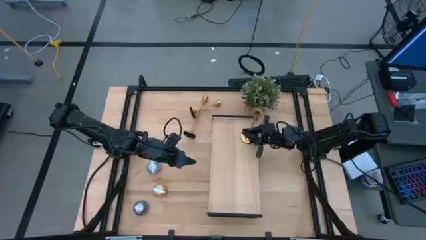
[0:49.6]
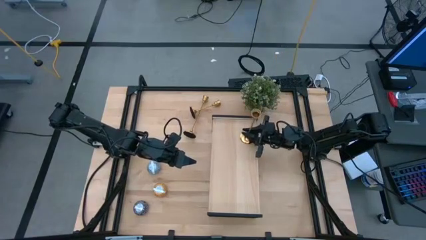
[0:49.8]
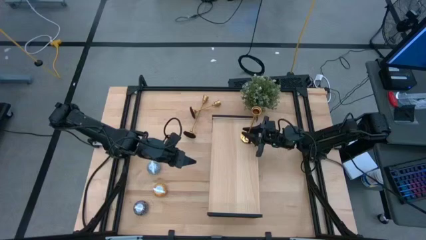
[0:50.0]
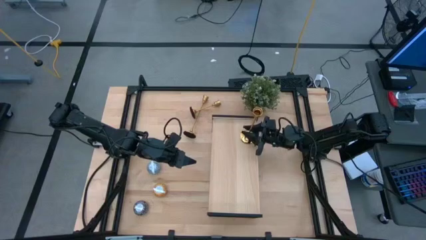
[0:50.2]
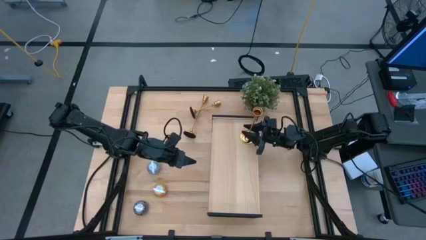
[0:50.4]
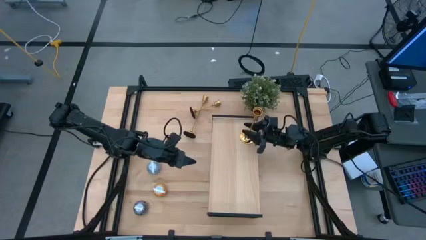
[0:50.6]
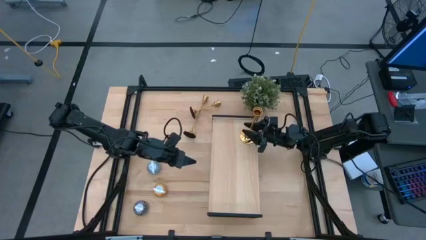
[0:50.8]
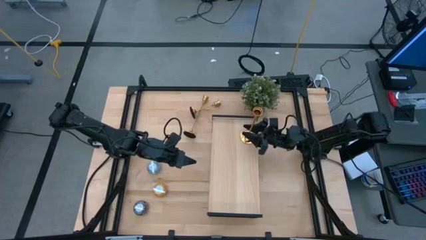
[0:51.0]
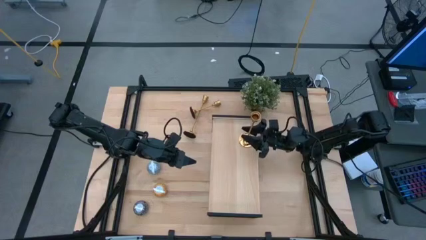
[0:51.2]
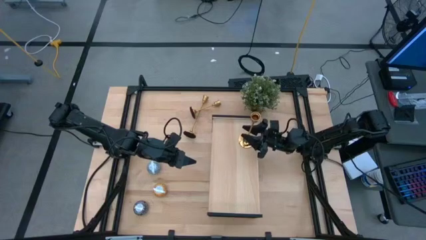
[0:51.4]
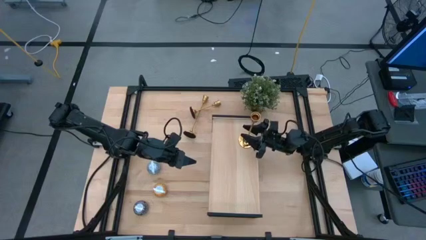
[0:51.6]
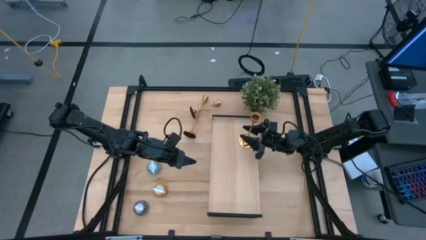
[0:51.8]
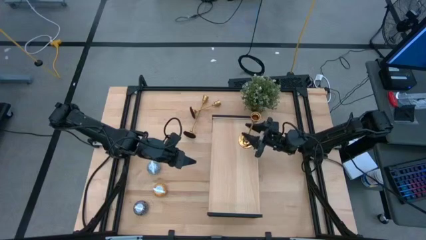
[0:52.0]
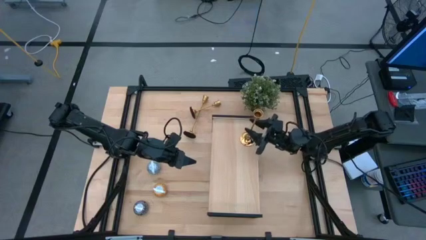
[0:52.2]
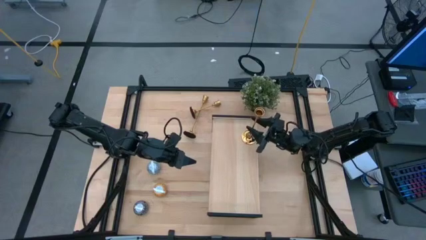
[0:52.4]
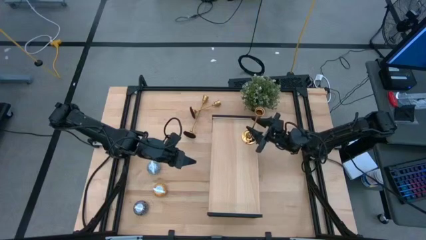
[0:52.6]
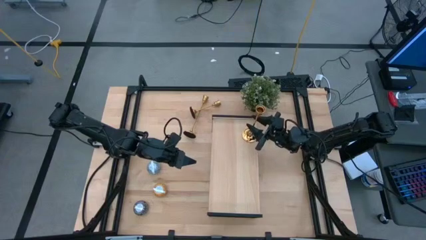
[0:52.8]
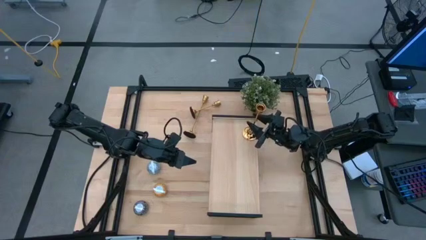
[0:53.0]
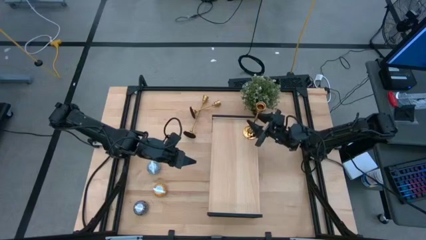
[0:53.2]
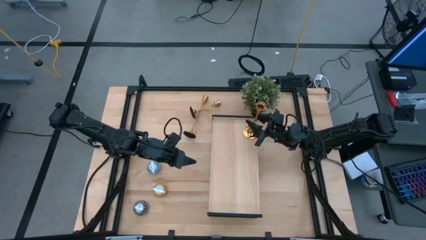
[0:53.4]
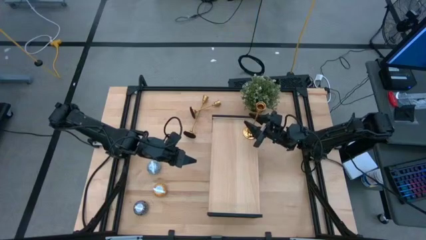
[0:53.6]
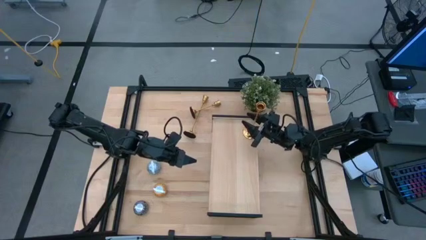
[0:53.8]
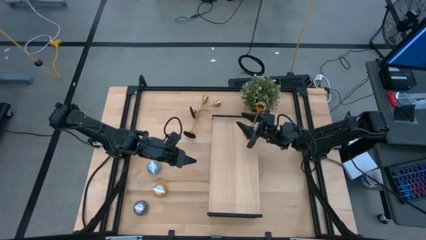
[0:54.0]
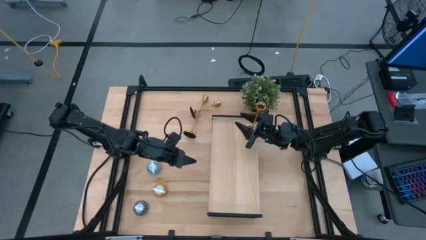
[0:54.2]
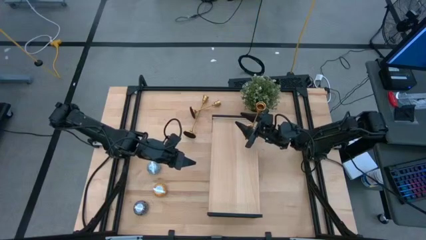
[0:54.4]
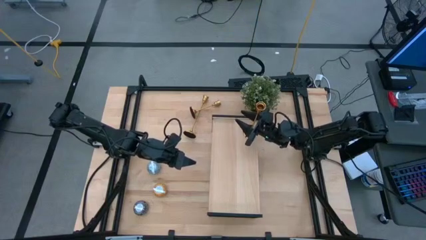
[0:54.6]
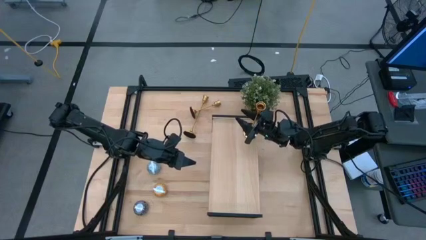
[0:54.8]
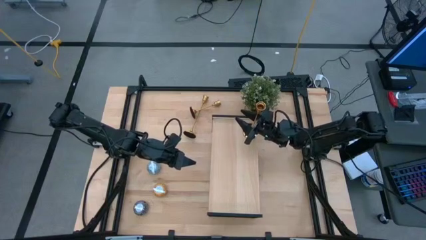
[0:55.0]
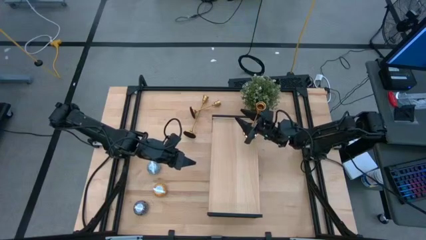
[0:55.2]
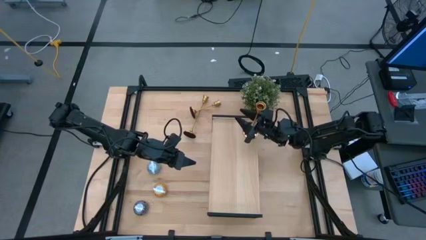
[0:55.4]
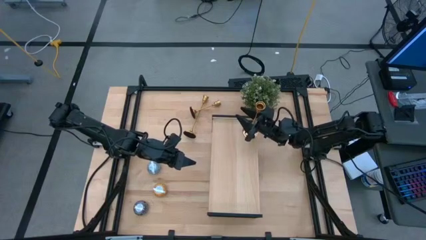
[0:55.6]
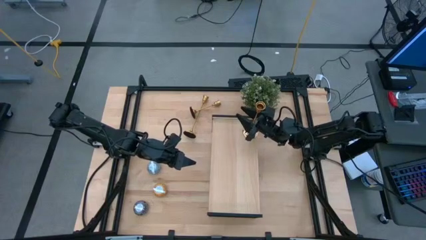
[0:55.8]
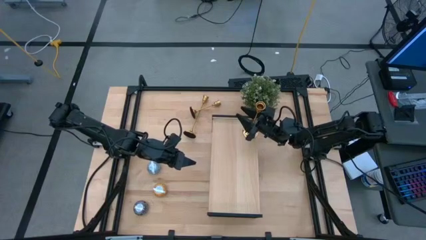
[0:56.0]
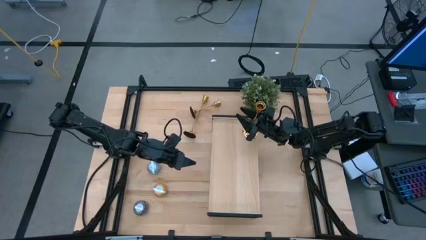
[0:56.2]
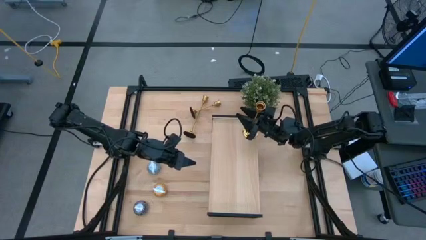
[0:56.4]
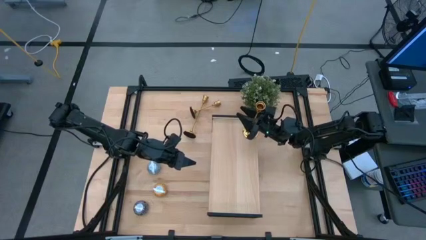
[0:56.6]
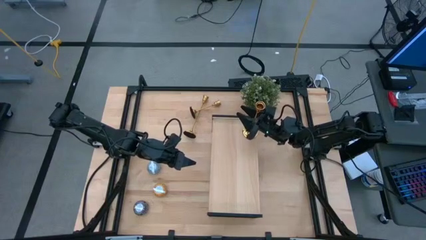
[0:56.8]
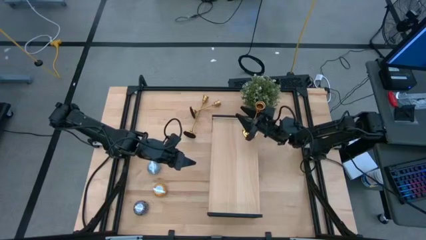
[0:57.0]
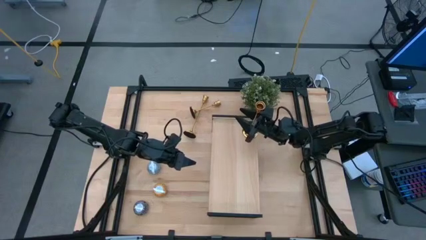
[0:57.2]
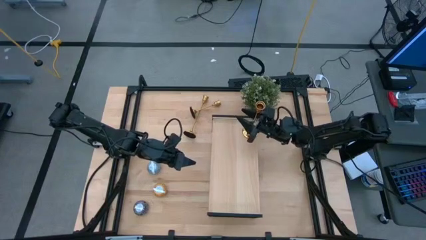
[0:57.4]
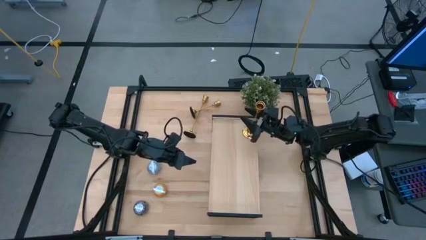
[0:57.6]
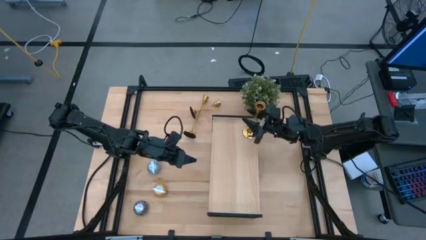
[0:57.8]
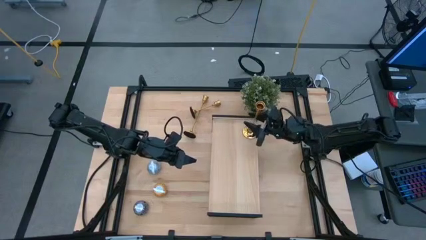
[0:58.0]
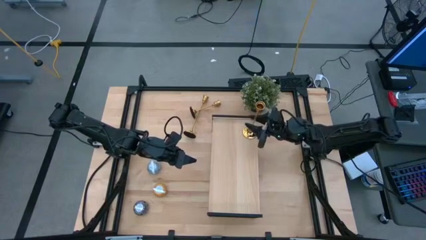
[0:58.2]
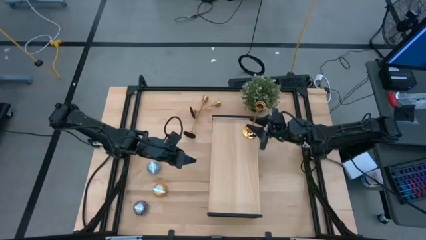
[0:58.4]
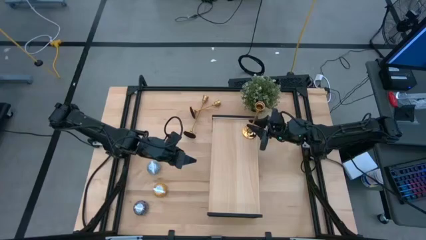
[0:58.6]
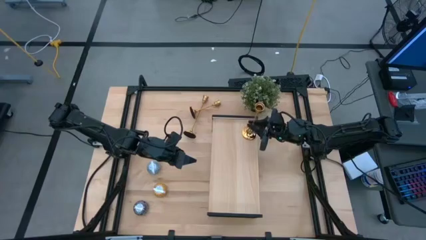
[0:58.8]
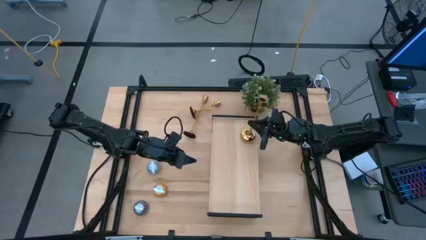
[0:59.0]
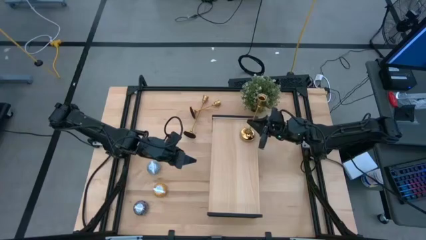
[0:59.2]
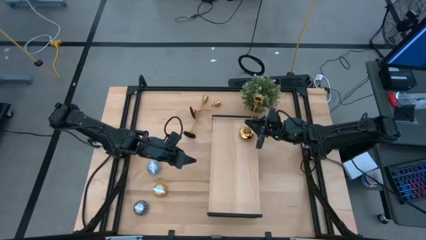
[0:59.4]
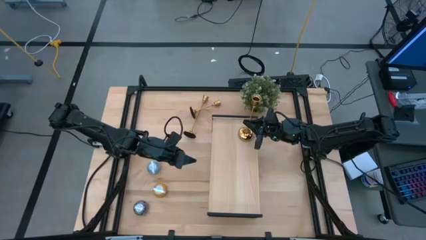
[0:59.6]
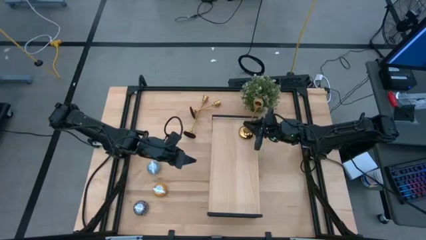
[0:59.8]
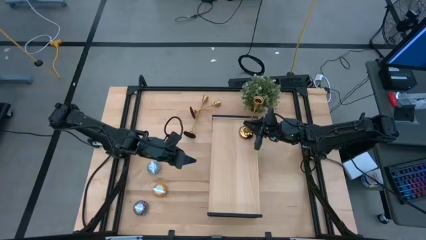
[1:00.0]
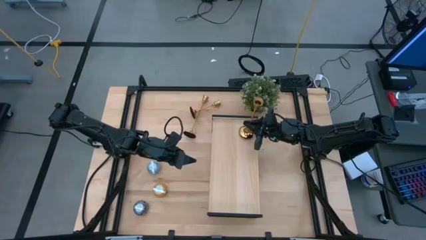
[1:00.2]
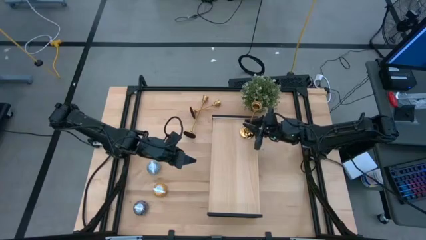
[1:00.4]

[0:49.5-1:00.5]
Task: Pick & Place candle stick holders
Put the right gold candle holder on the shelf

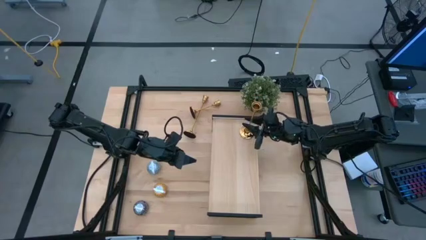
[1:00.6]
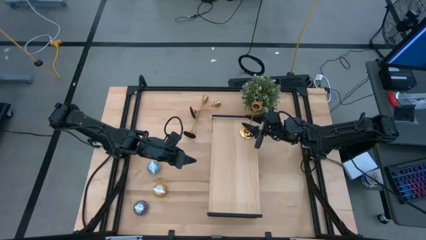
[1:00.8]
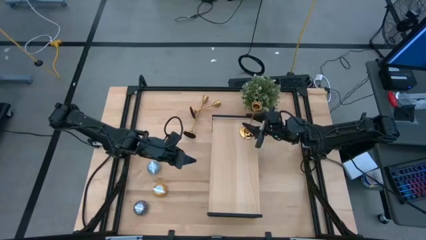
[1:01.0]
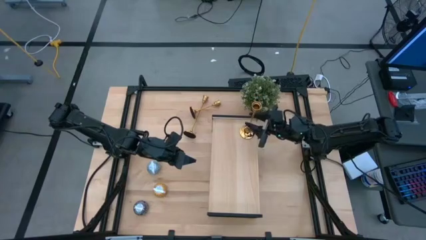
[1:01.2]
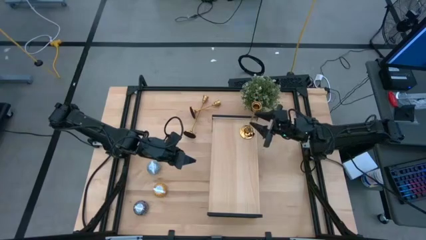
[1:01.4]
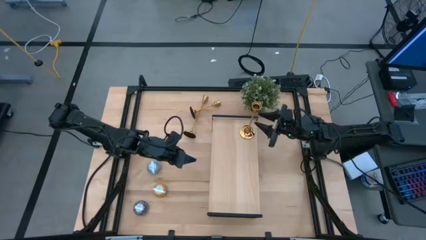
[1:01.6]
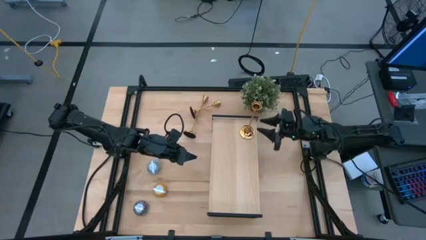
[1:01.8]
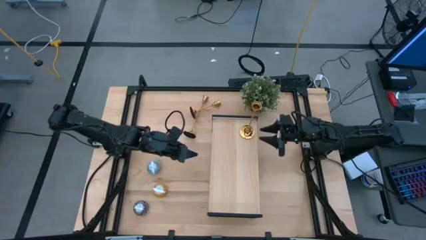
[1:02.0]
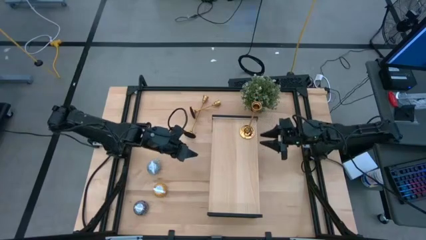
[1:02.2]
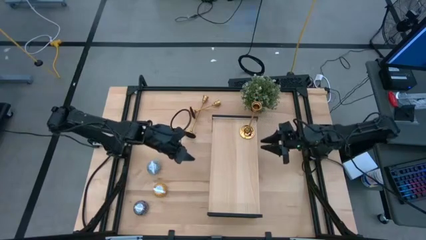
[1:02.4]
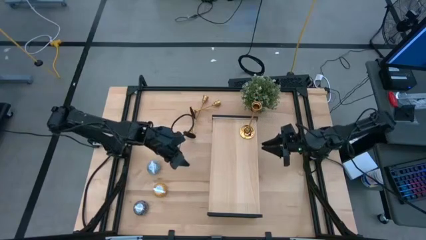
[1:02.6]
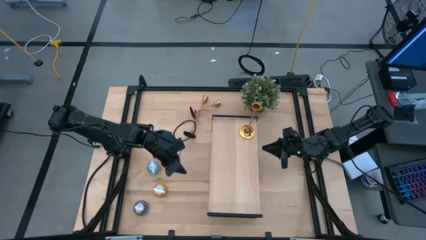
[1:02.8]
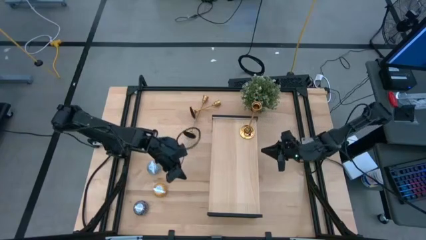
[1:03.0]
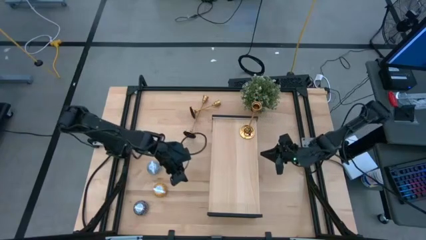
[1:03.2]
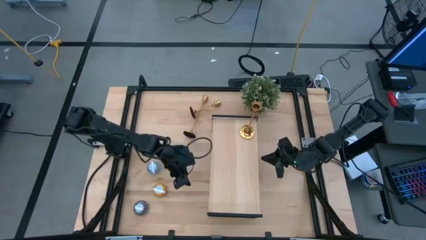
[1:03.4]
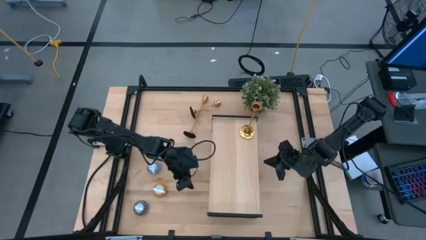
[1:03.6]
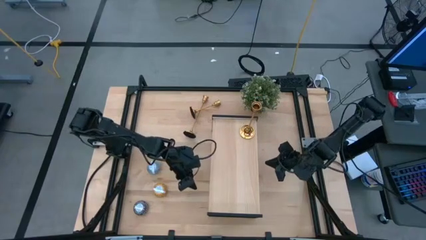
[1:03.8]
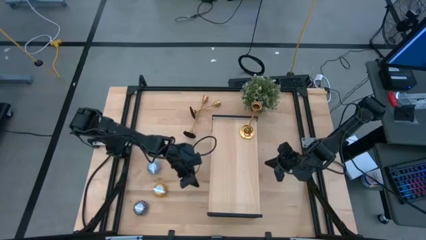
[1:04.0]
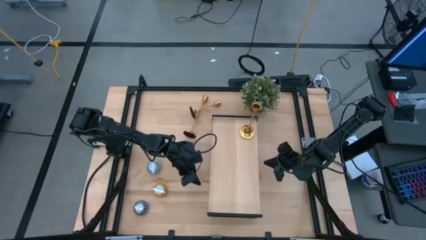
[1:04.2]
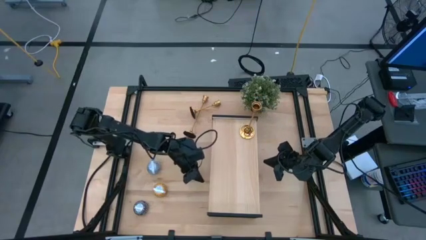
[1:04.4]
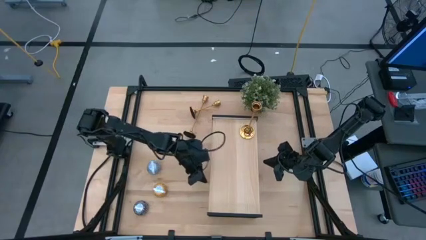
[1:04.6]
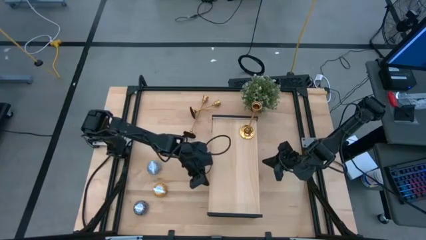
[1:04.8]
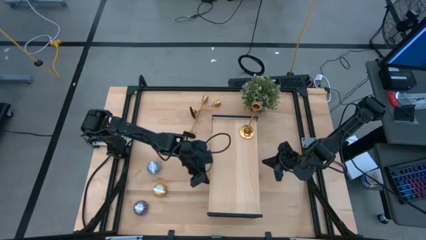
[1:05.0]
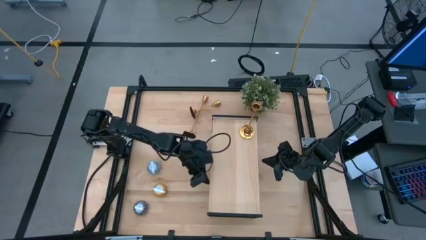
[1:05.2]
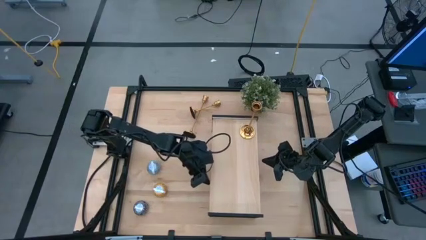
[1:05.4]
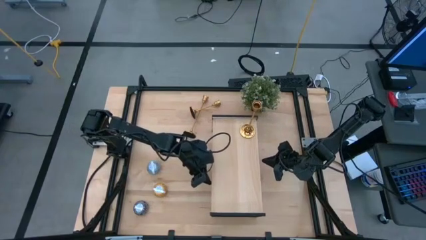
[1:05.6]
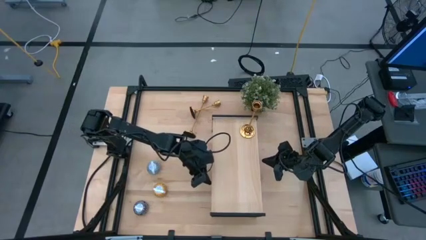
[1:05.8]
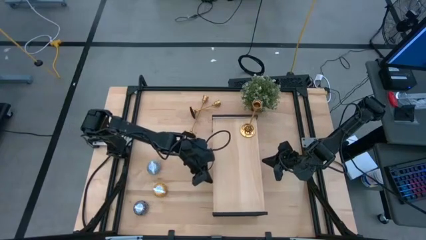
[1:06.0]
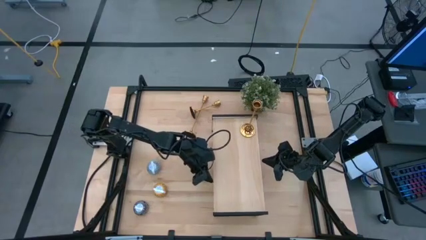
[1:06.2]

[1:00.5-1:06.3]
Adjust the shelf
